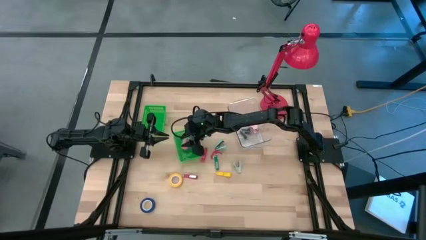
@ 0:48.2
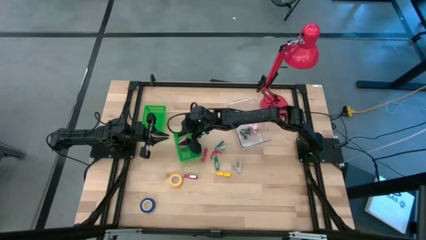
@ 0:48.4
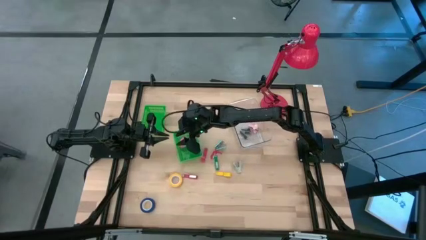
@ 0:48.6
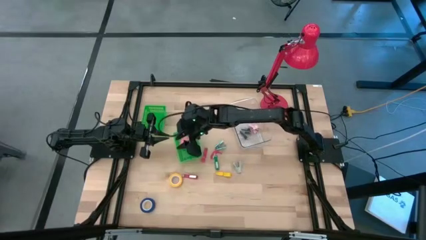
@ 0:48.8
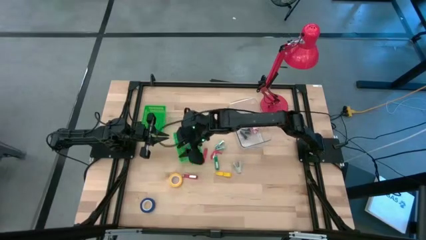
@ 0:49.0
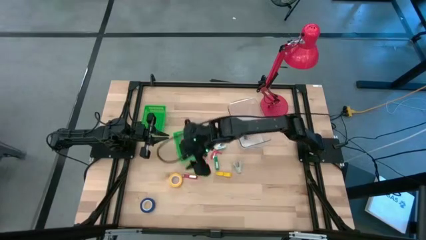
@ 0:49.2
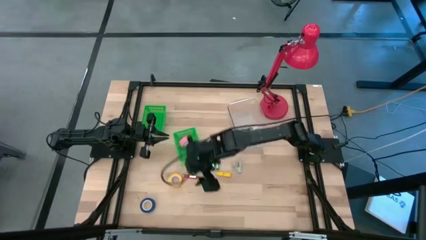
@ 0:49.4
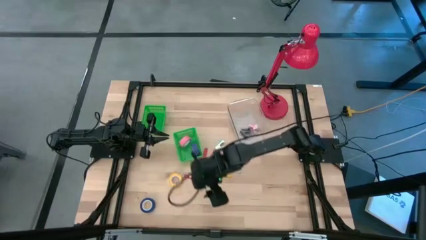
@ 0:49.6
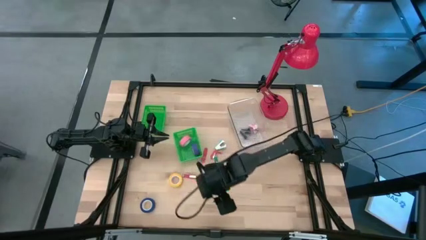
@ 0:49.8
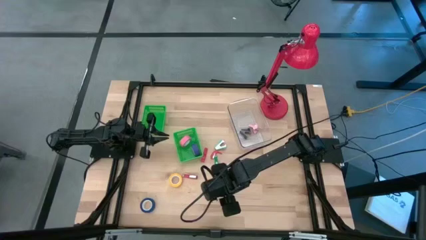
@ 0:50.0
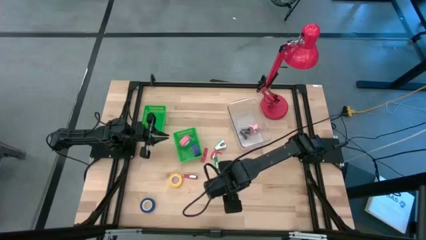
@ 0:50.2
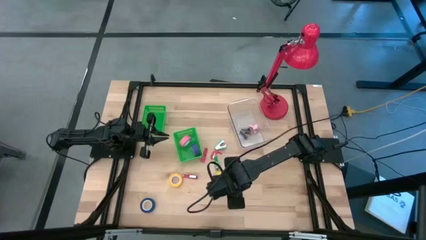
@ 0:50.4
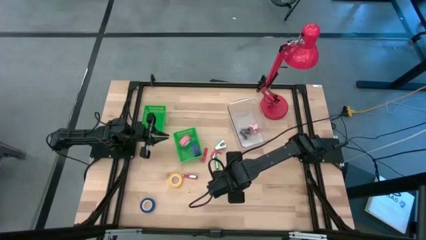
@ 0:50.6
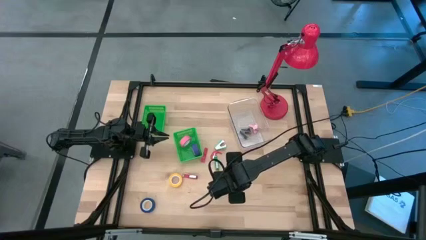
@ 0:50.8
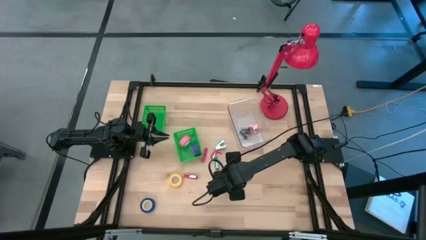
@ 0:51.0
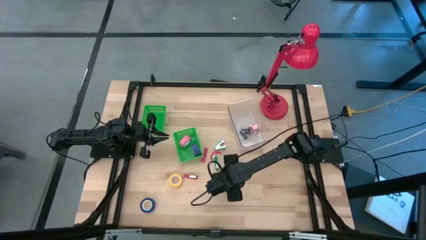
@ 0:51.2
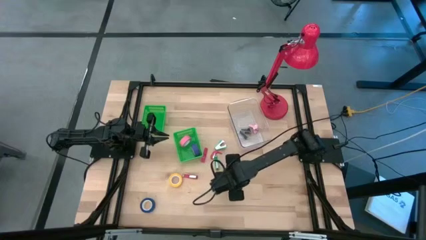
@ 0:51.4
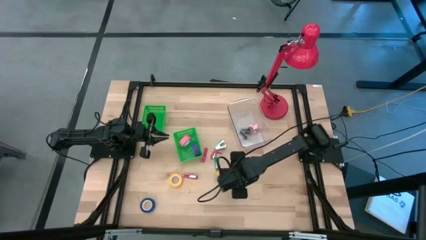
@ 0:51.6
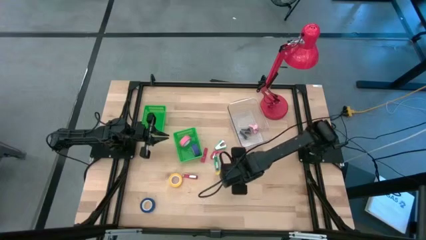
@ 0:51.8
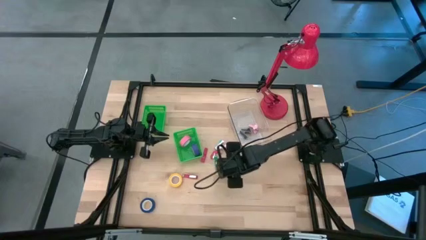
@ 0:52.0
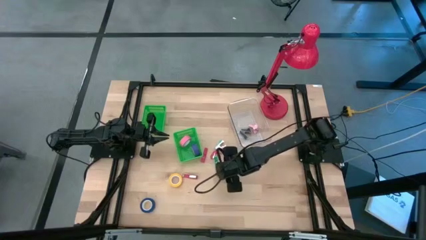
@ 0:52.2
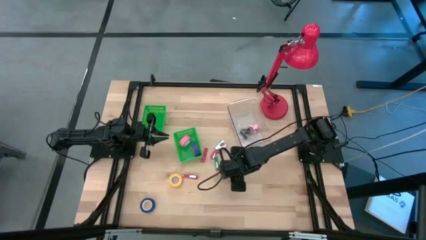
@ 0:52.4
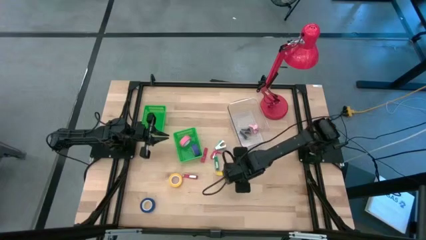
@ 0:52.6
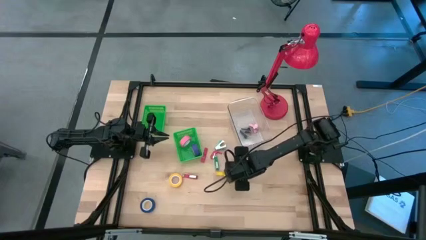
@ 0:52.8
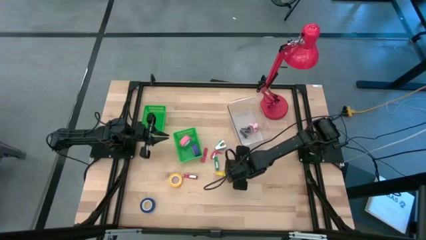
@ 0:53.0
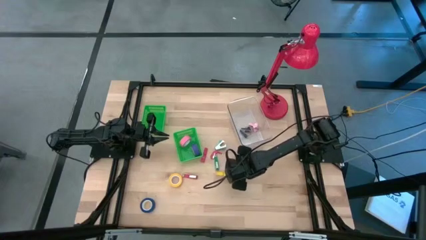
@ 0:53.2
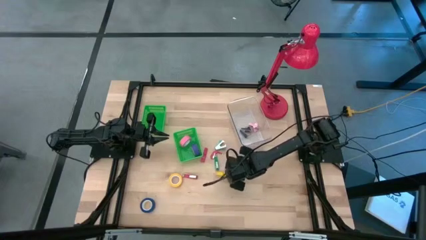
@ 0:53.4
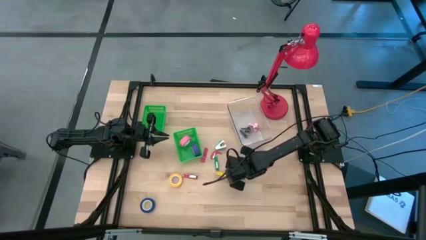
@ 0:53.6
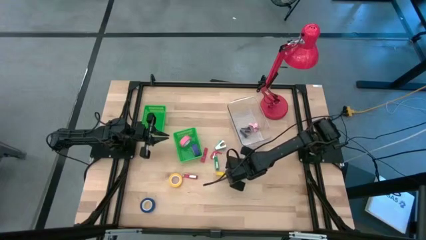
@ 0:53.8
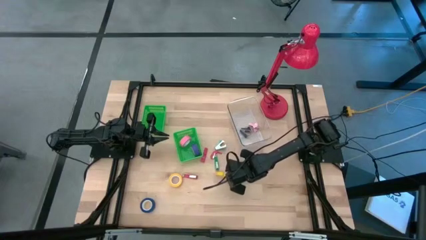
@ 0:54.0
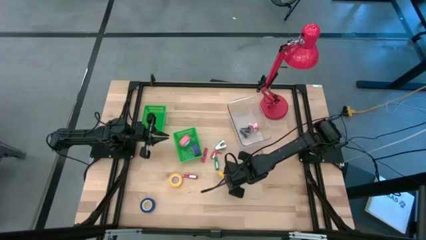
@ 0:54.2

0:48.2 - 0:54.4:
Task: Pick and place Stapler, Stapler remover, tape
Put the gray staple remover into the transparent bin

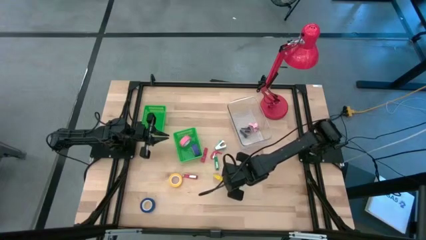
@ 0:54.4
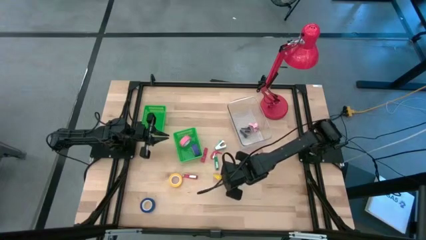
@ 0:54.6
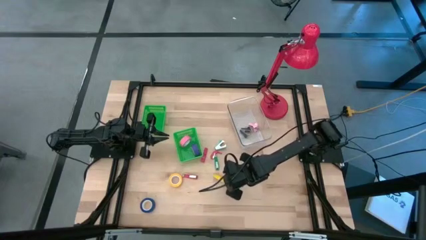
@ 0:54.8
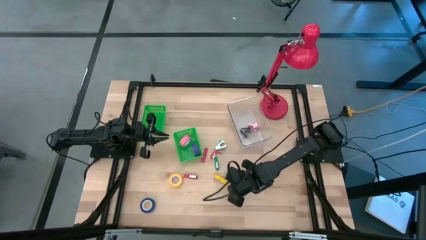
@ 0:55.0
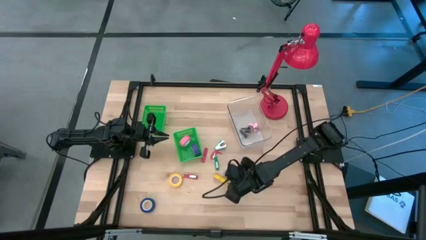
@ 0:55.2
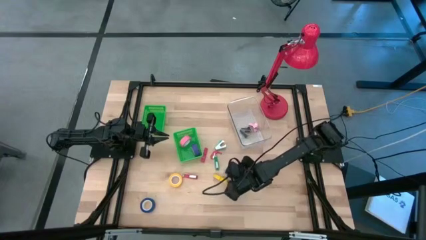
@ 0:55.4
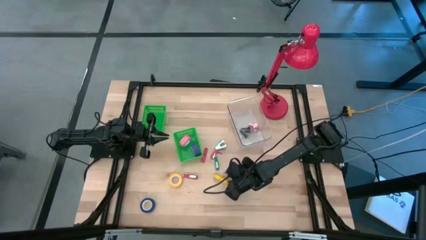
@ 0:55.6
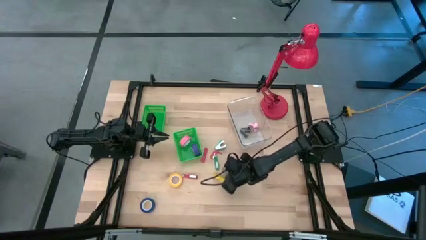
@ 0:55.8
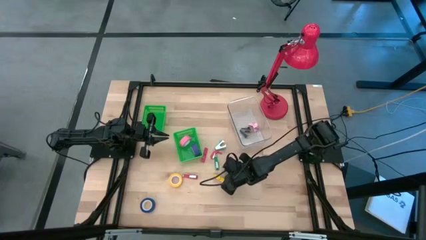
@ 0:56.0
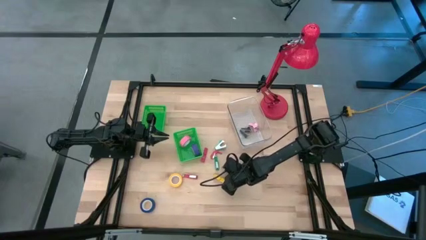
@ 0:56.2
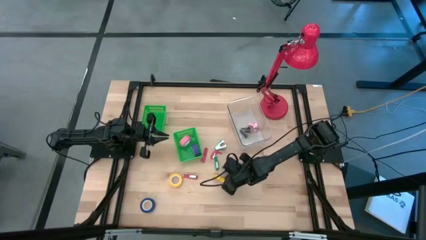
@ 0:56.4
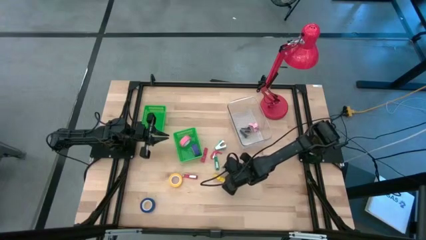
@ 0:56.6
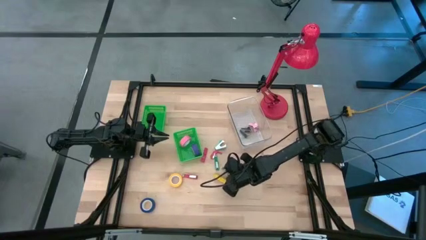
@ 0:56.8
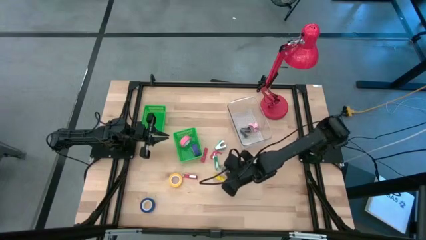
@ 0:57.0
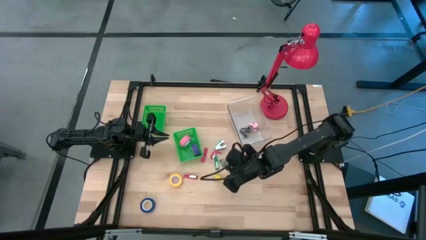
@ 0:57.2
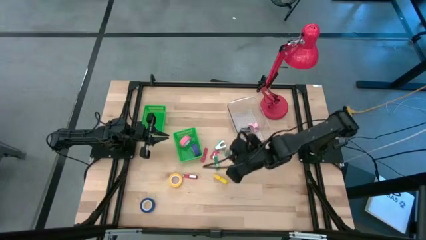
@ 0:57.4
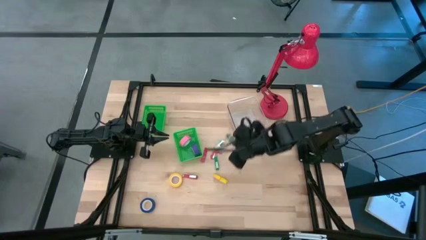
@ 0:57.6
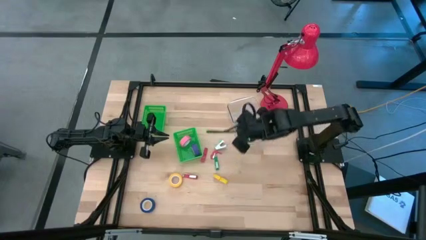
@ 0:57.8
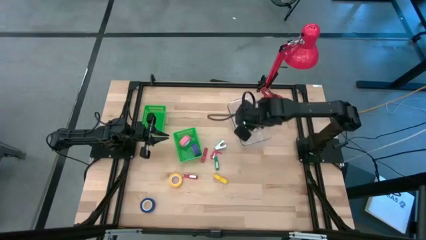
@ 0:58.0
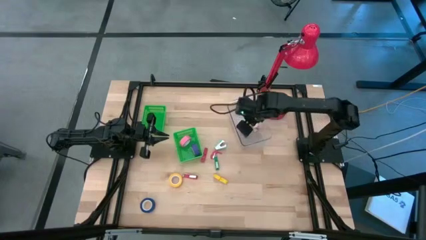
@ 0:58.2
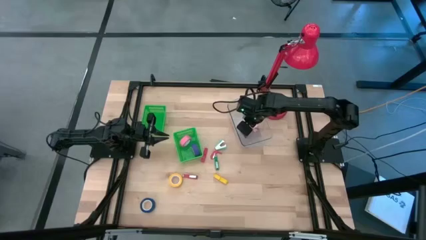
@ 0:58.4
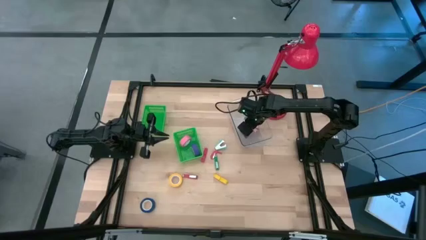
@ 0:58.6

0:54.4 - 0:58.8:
Put the gray staple remover into the transparent bin

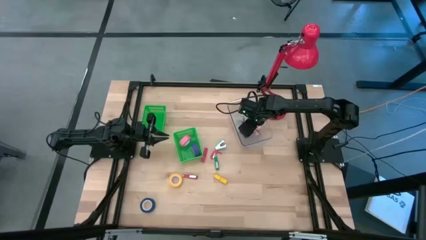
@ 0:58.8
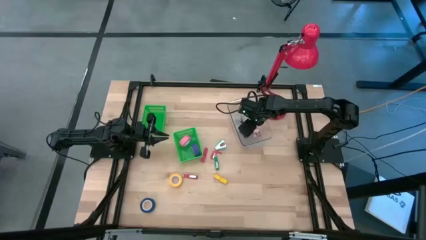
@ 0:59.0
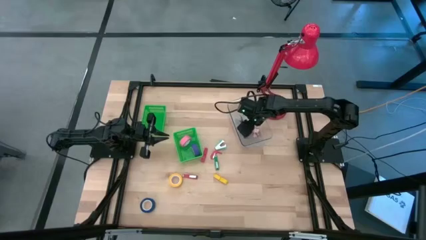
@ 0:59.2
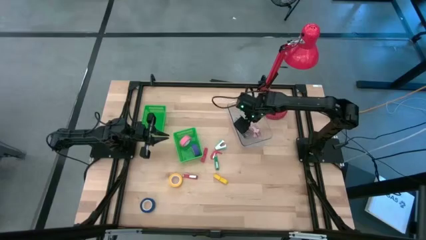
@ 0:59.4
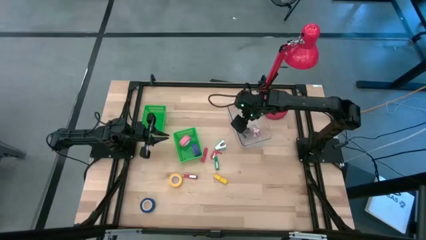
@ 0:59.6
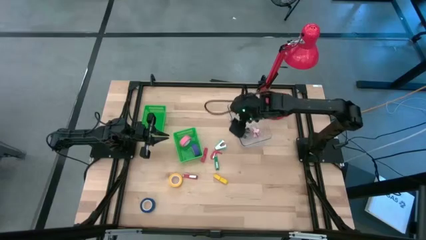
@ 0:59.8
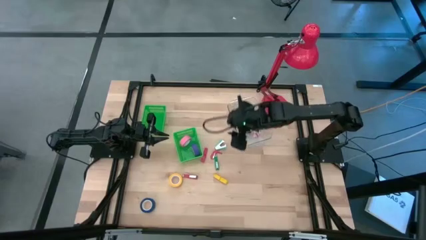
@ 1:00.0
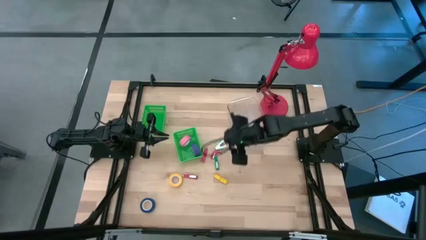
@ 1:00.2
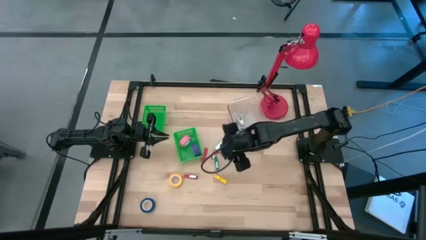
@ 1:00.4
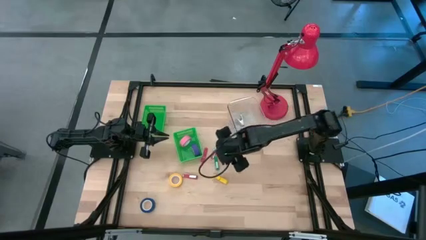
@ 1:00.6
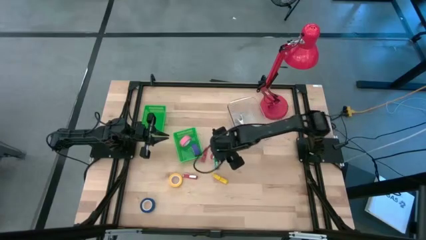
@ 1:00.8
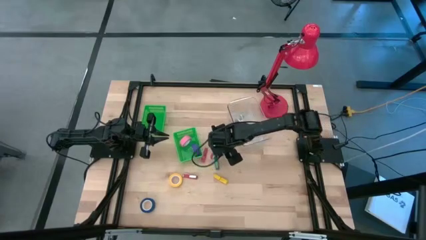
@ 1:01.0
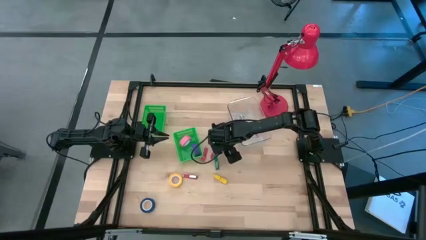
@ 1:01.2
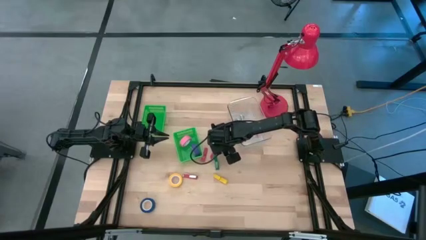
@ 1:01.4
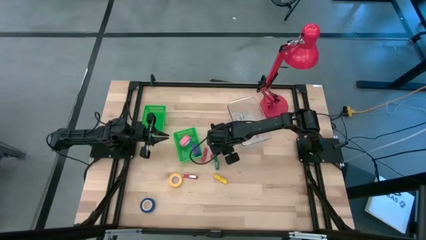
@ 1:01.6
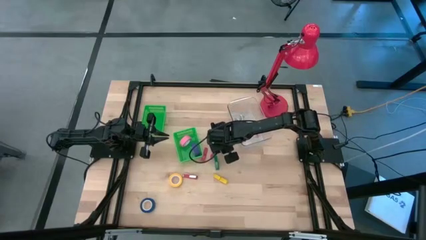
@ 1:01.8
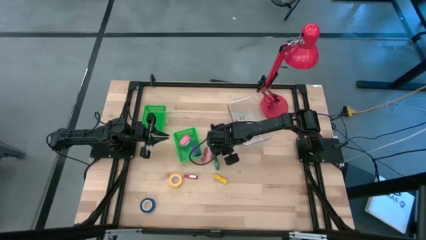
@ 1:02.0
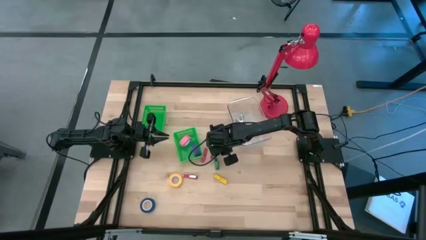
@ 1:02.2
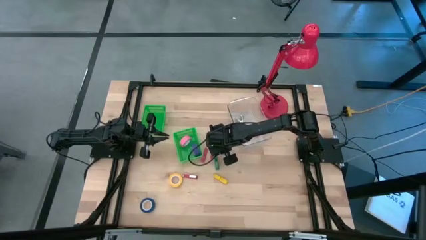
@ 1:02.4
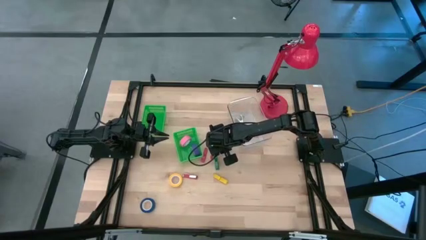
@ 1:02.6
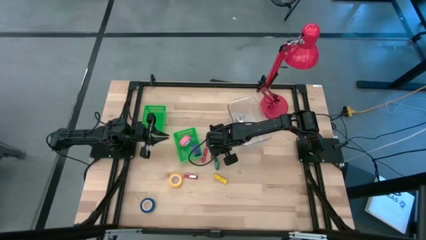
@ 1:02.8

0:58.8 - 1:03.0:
Put the light blue staple remover into the transparent bin

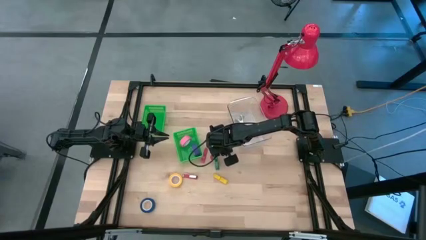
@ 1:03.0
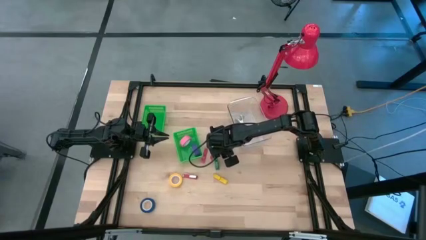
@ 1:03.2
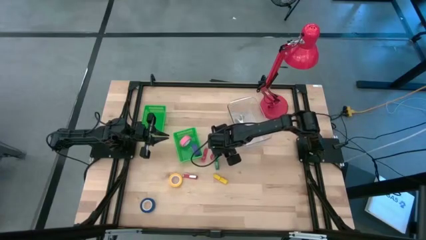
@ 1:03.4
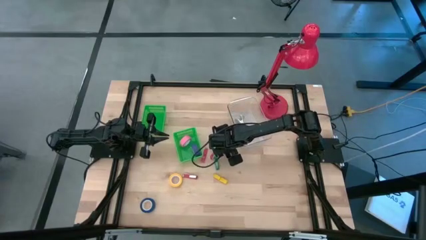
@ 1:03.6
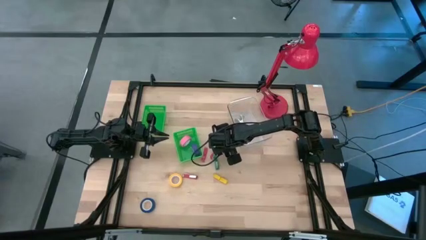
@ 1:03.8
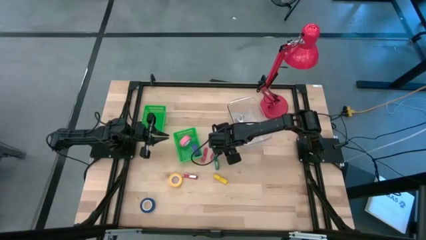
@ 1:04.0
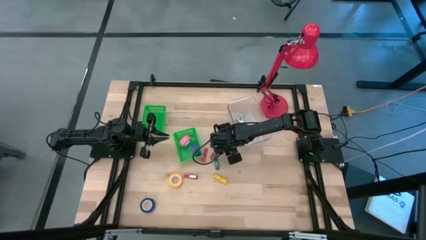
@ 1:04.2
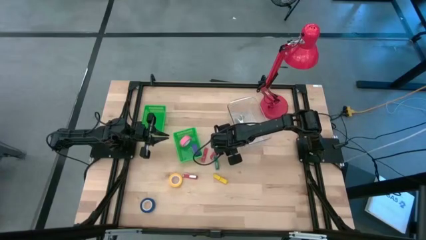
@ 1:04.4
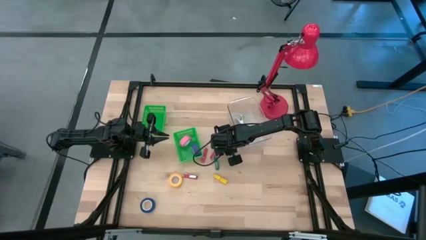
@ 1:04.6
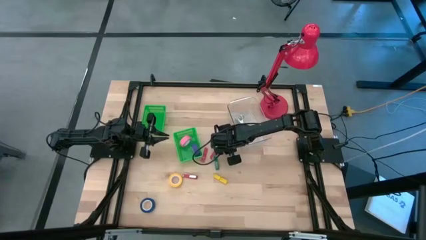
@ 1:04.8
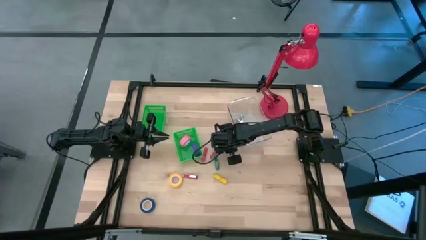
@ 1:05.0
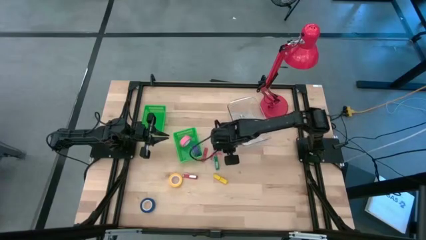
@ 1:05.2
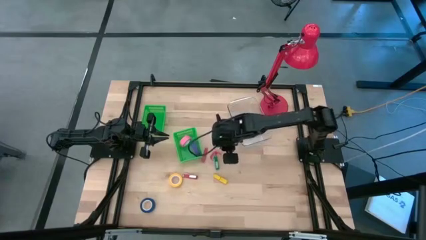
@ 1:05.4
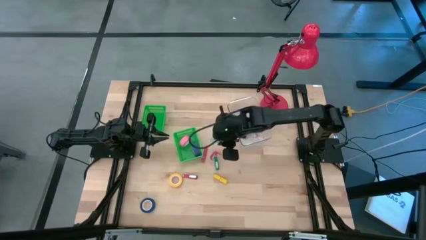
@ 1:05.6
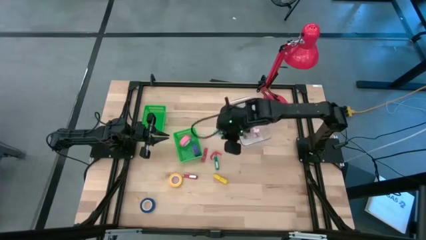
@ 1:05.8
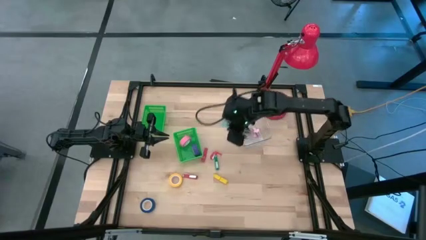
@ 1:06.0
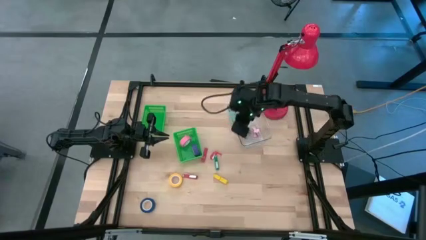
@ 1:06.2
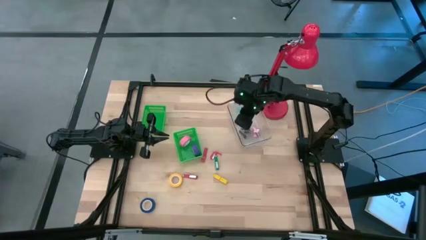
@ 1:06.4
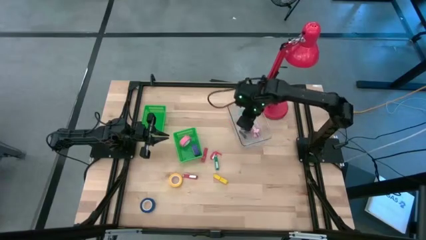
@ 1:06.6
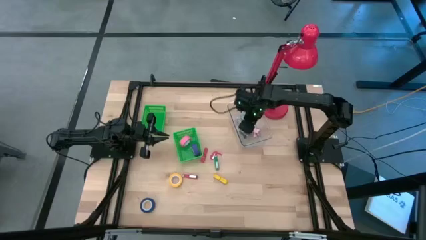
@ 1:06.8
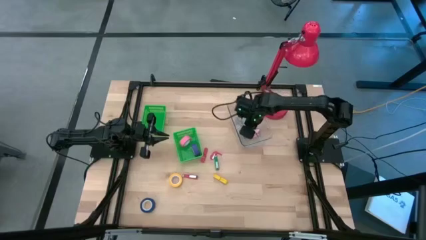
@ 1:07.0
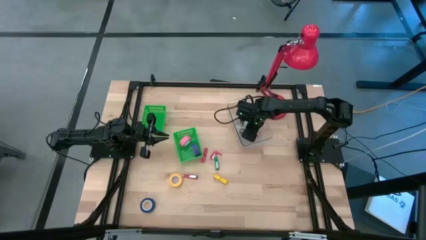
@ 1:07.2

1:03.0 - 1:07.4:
Put the light blue staple remover into the transparent bin
